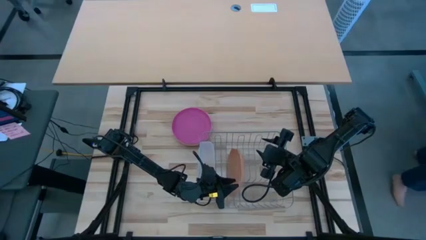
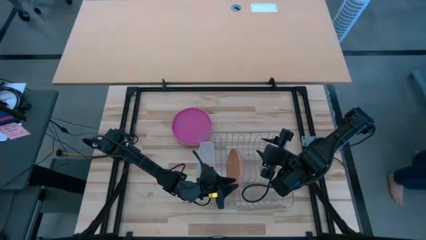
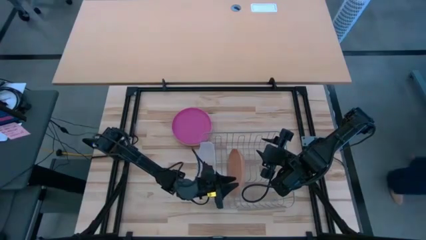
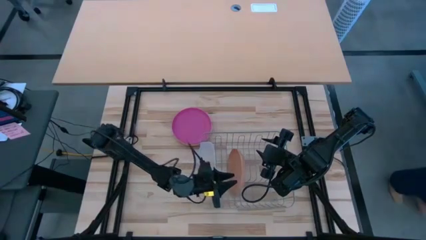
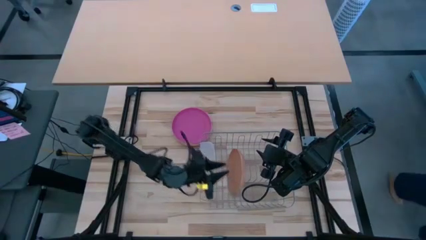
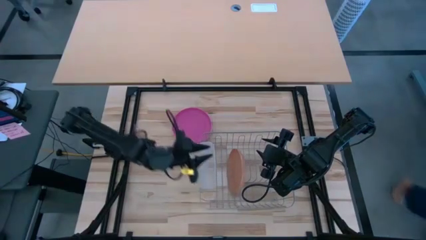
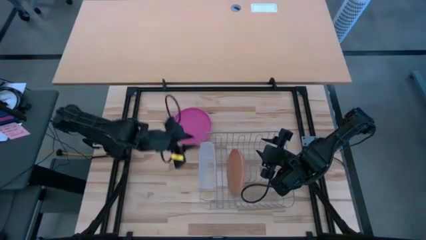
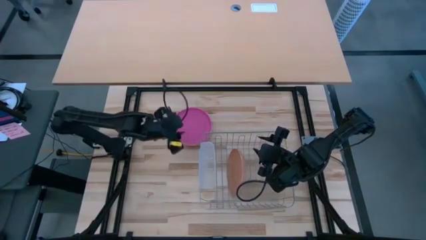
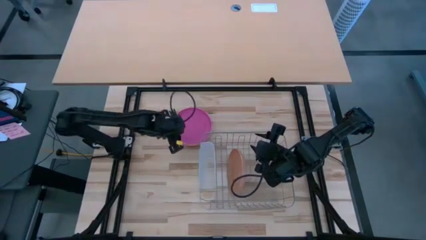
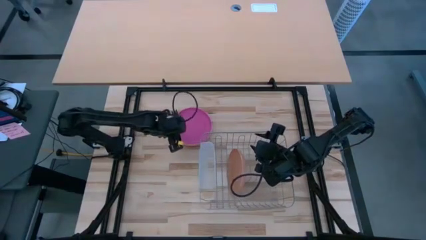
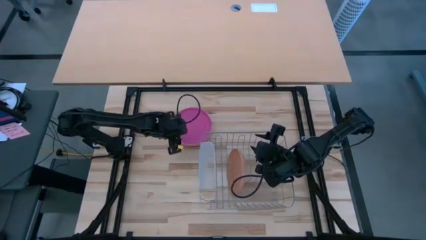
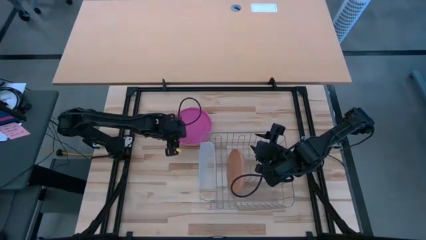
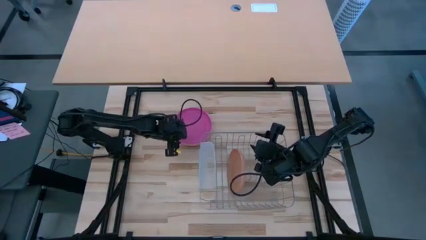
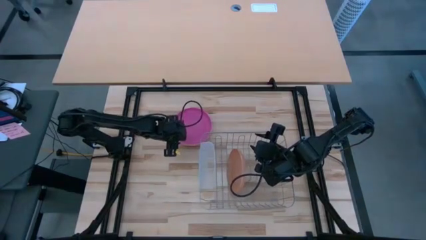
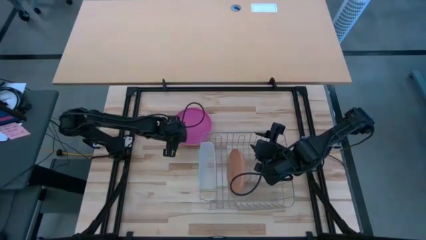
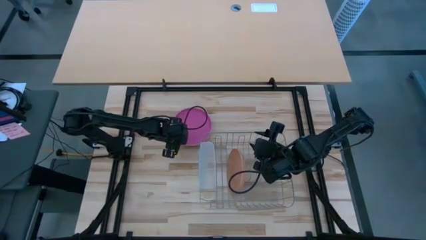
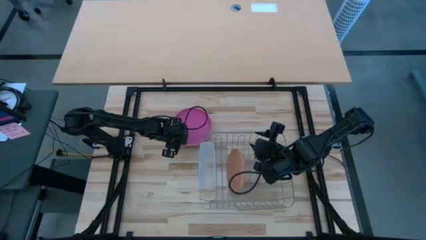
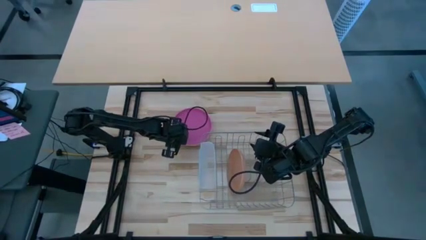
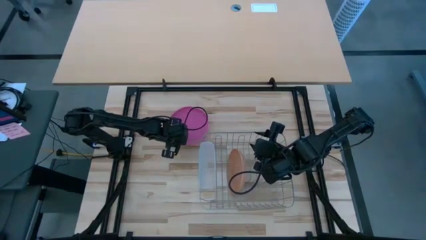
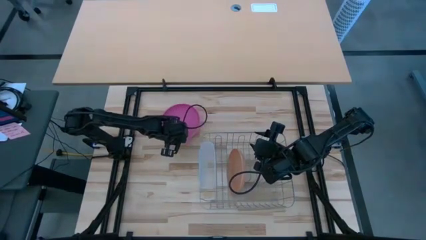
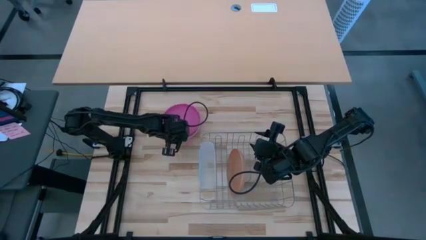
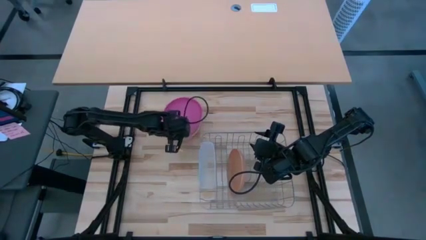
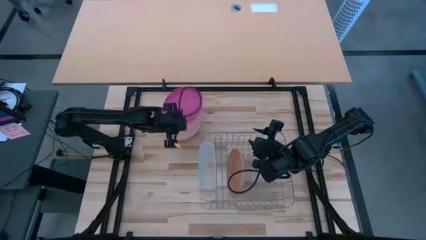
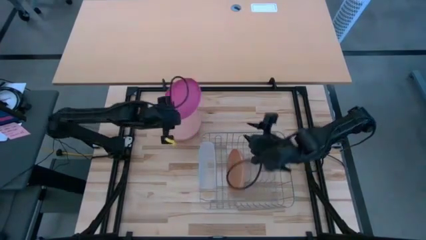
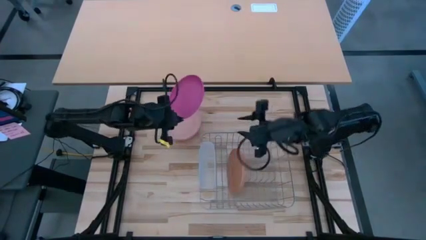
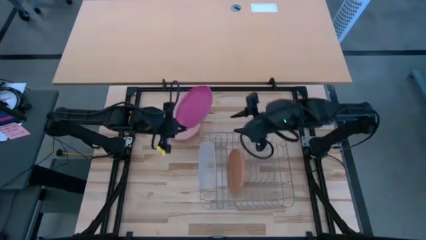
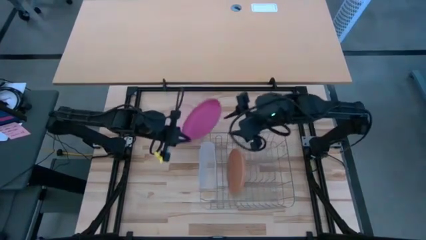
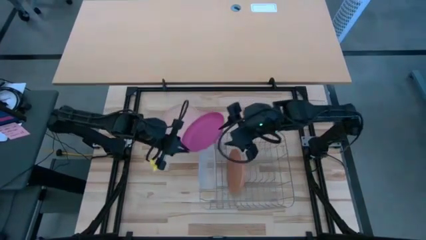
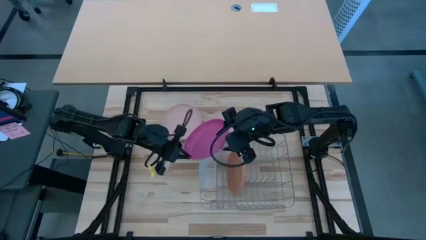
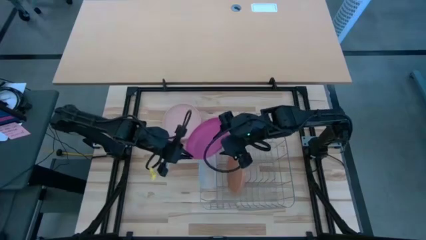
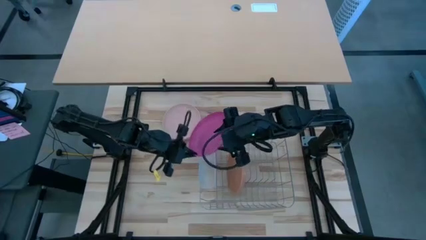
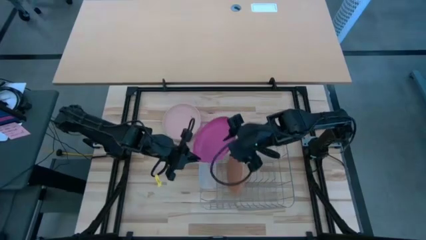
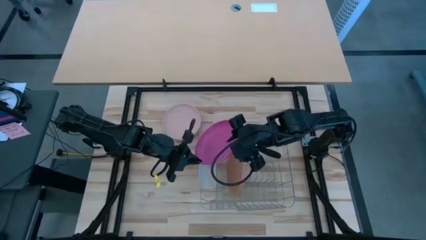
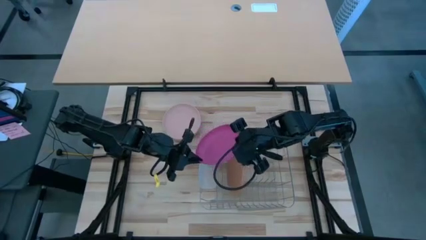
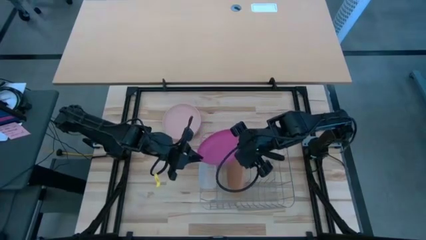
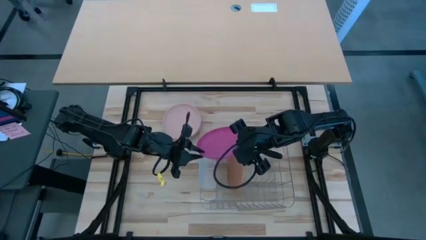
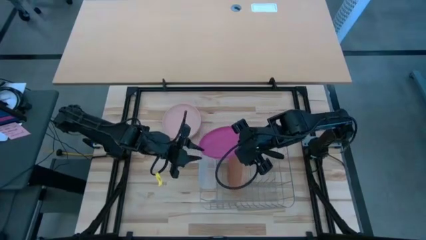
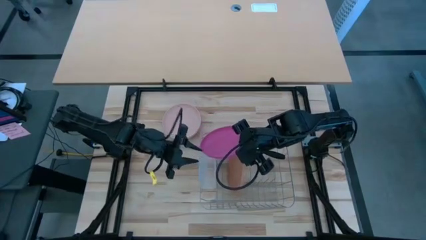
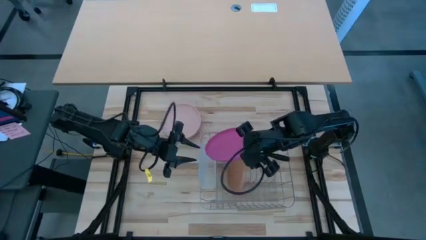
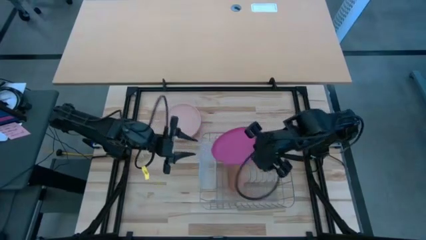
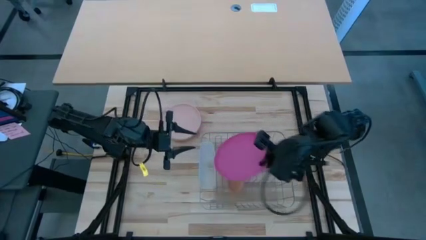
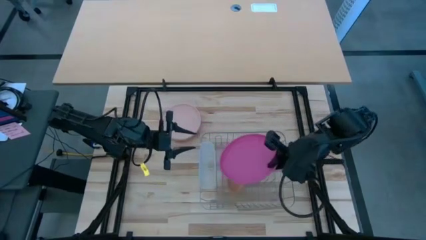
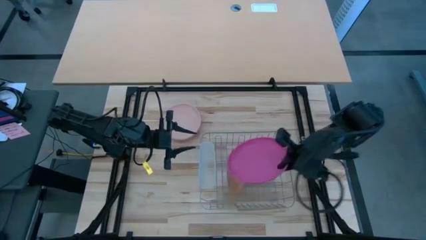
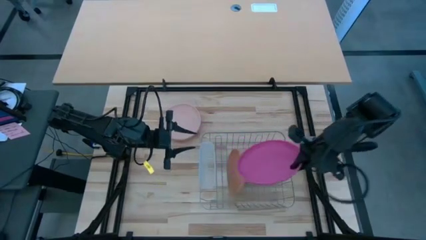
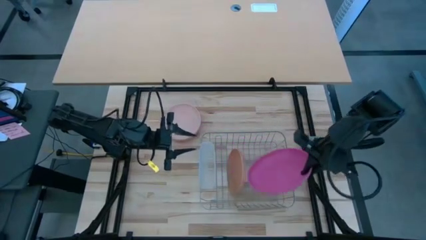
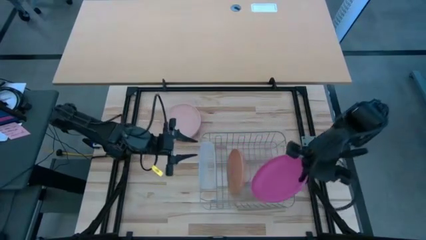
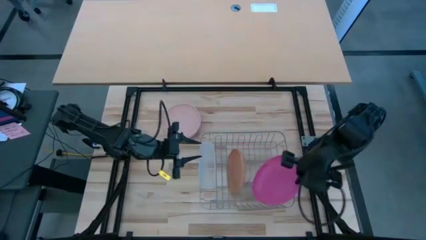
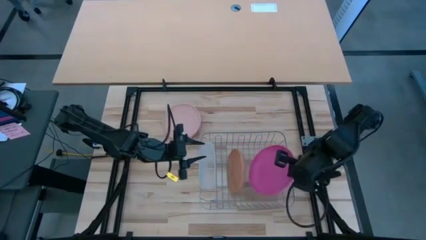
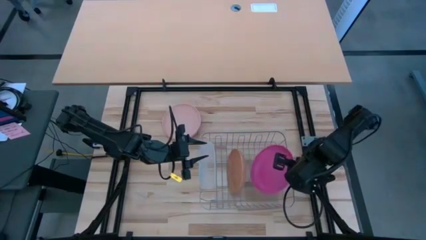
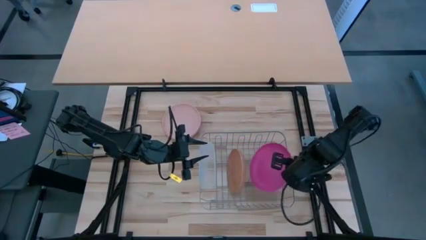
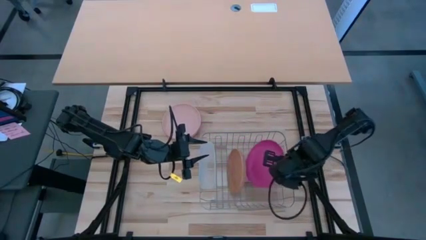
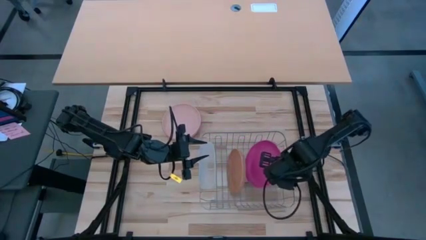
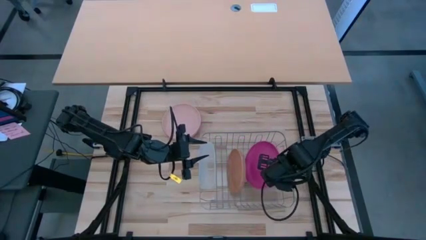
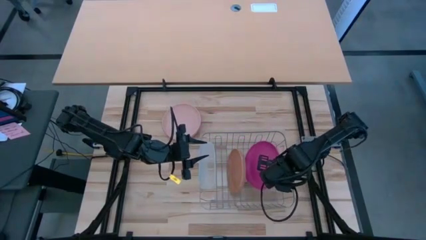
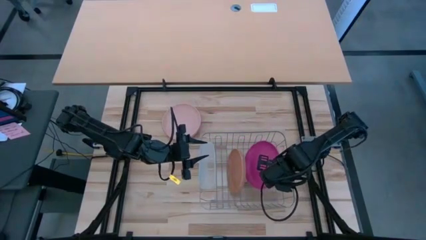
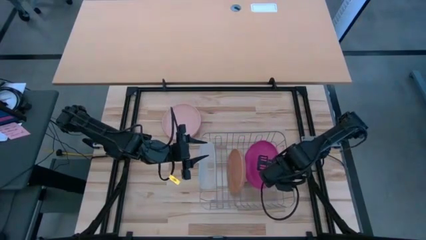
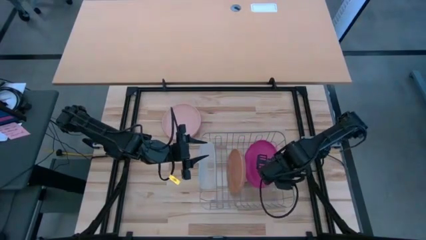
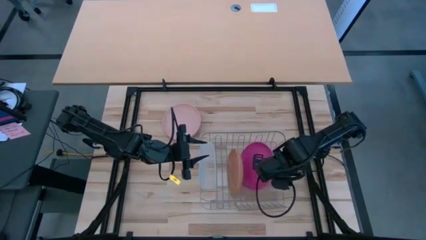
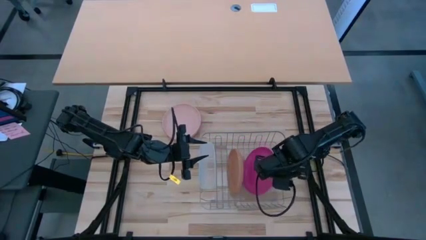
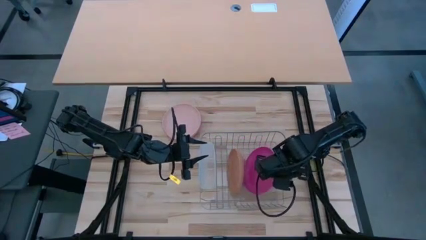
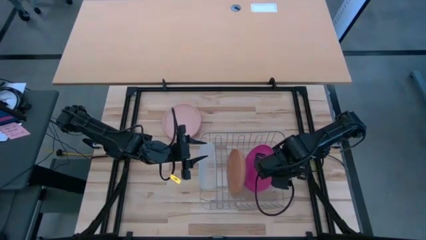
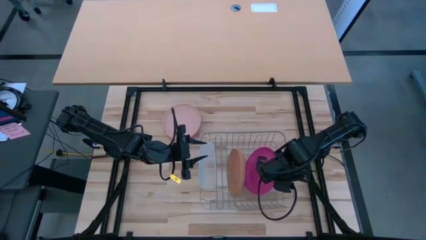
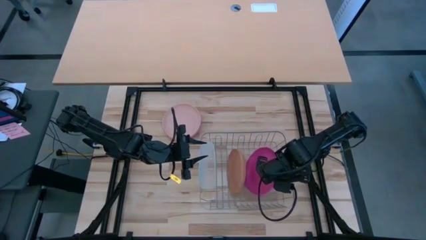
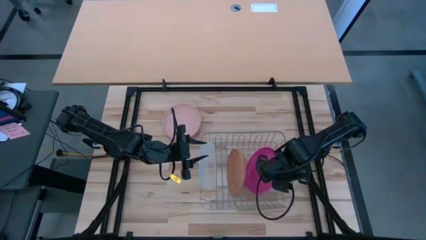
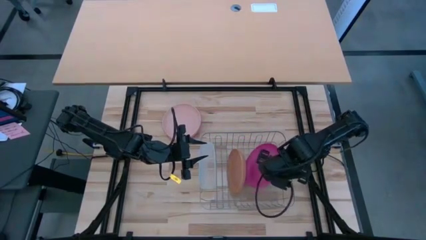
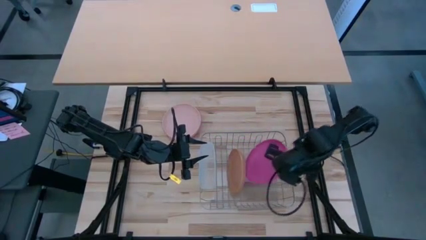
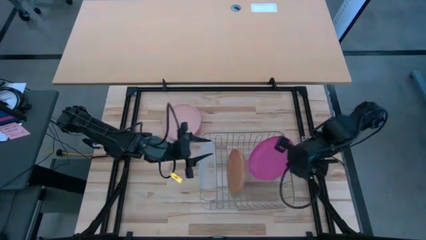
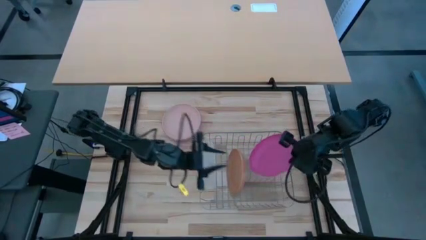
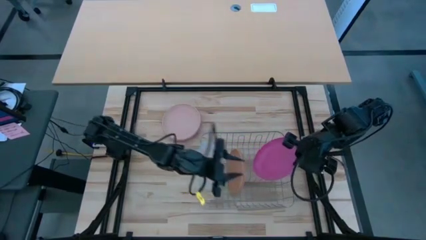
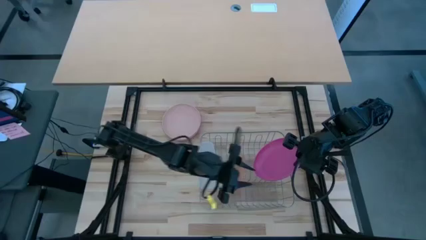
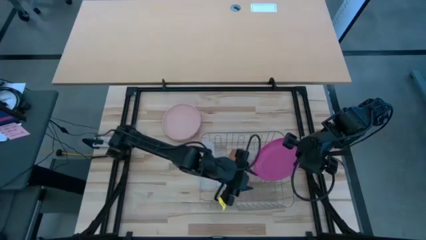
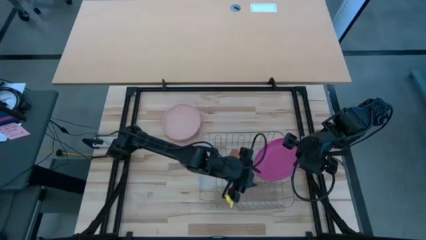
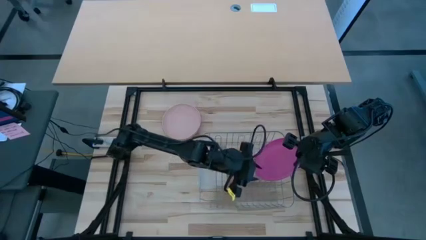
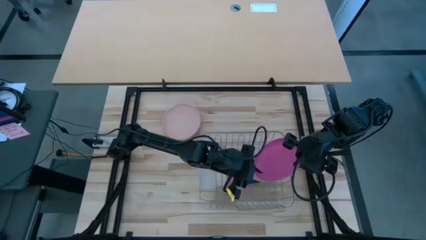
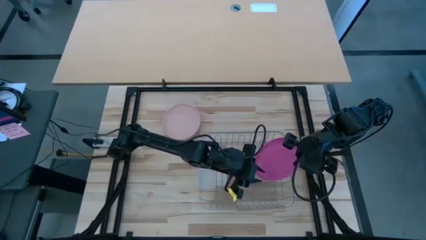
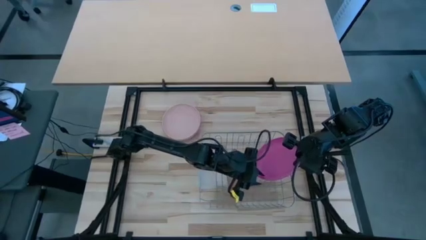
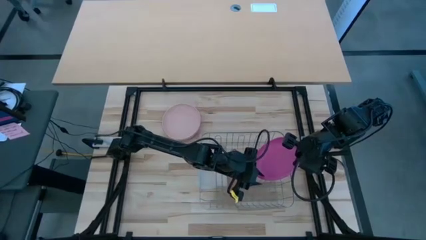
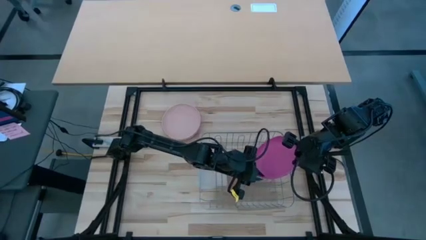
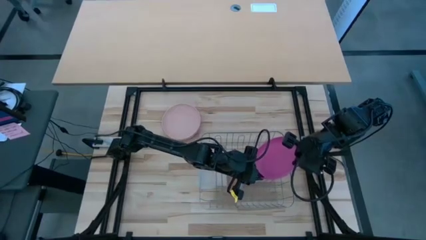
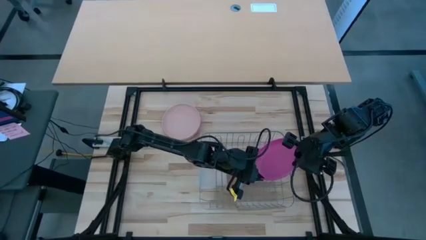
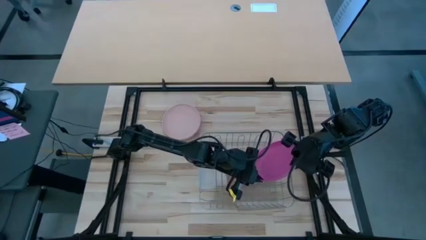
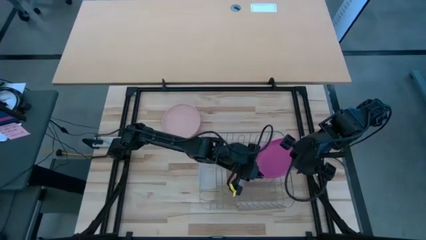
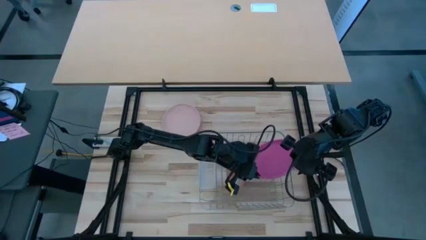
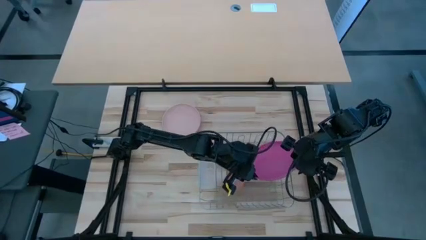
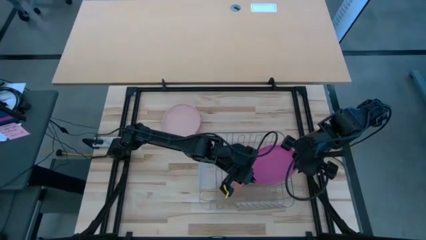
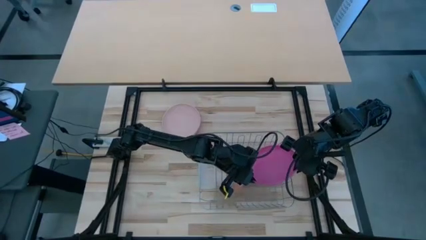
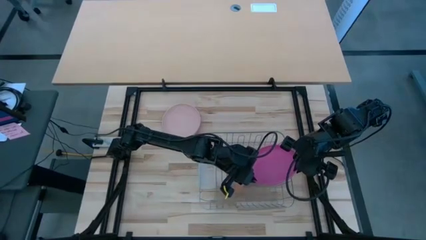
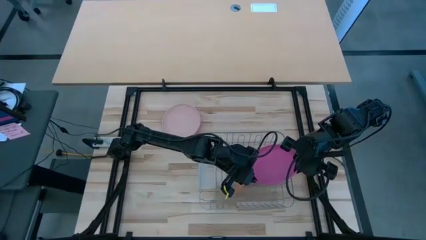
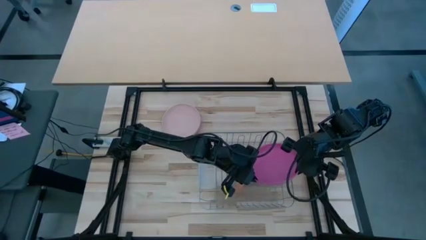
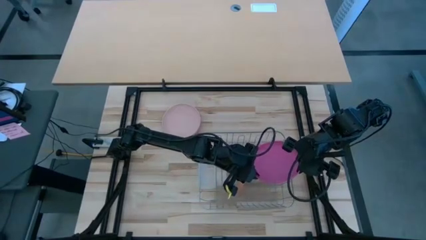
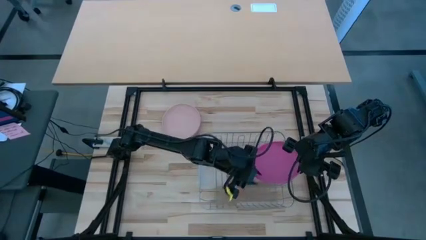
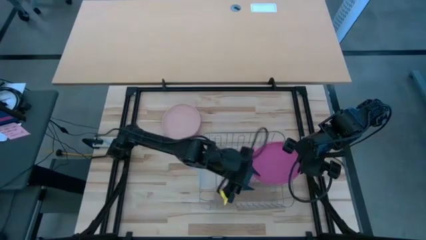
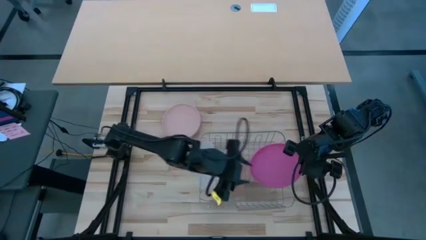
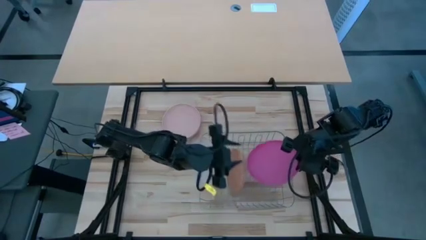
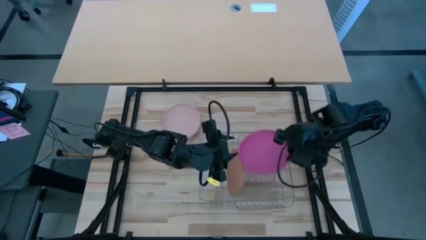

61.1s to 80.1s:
Task: Sort dishes
Put the pink plate in the dish rack
